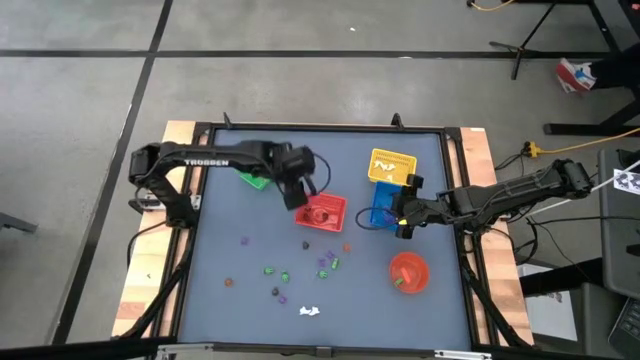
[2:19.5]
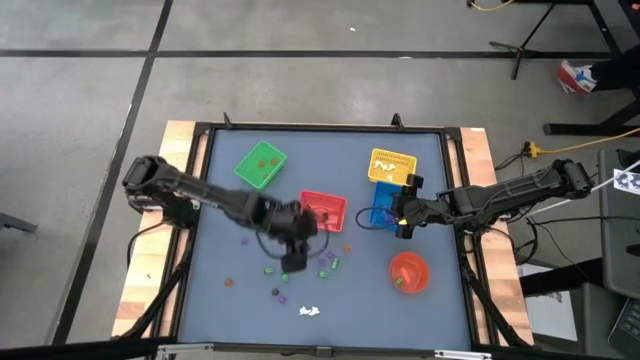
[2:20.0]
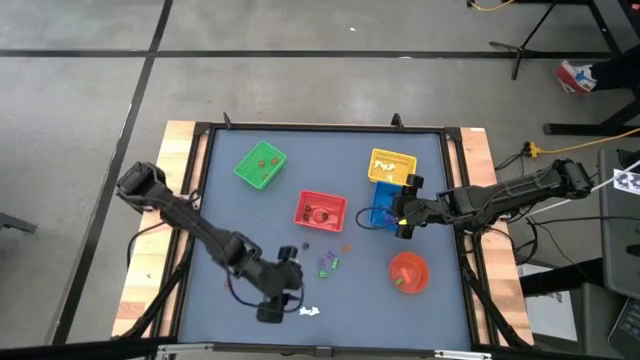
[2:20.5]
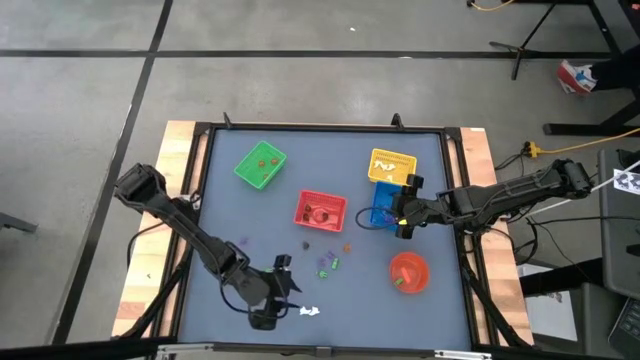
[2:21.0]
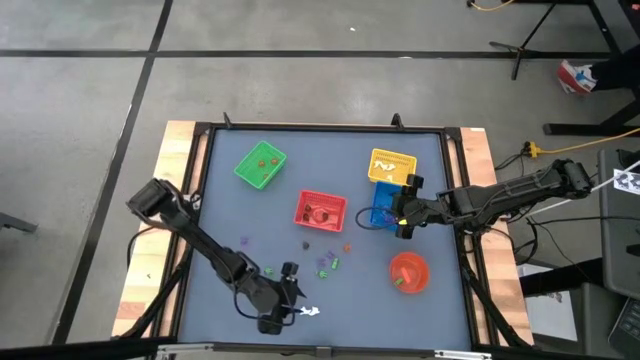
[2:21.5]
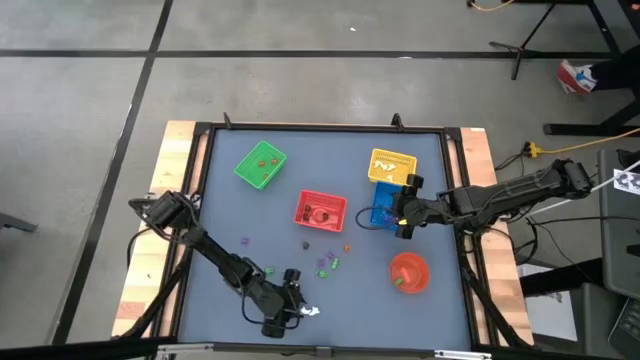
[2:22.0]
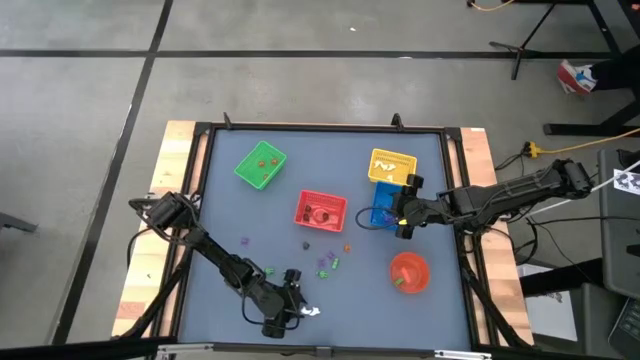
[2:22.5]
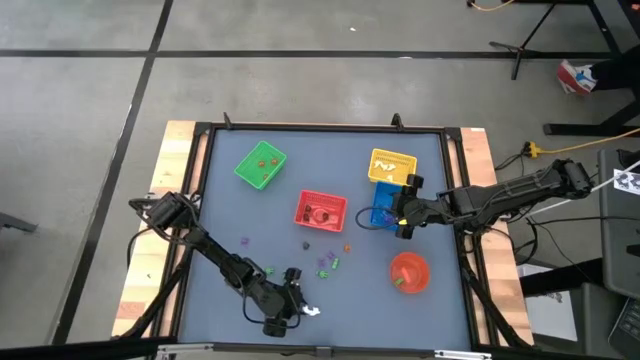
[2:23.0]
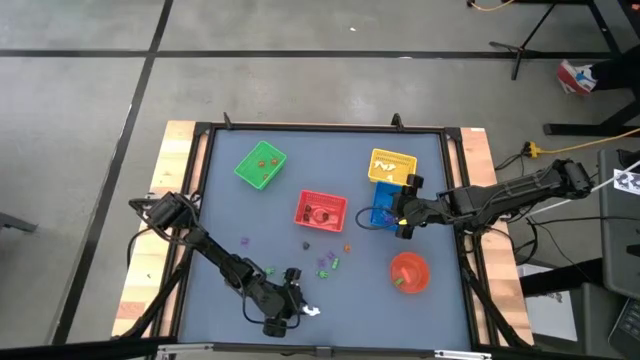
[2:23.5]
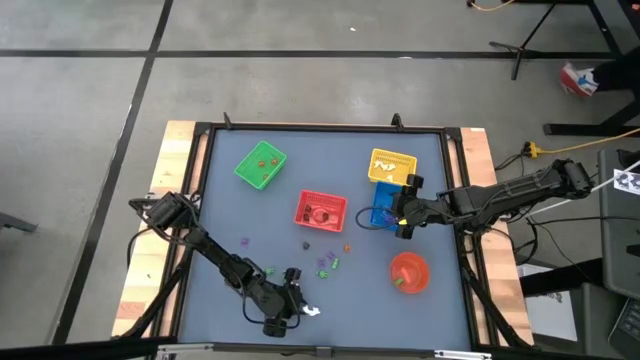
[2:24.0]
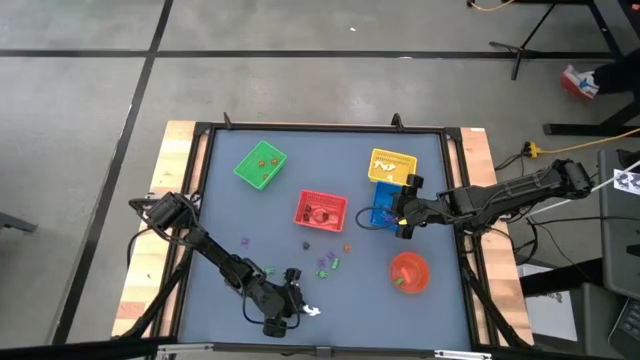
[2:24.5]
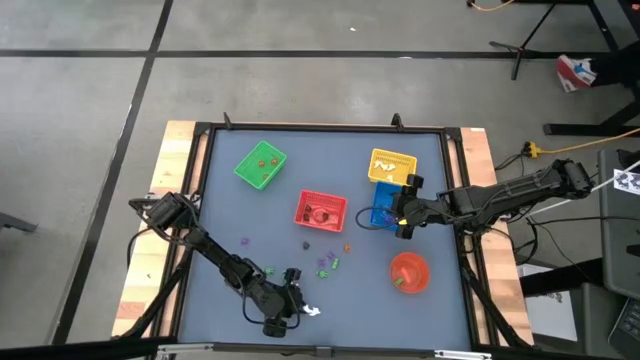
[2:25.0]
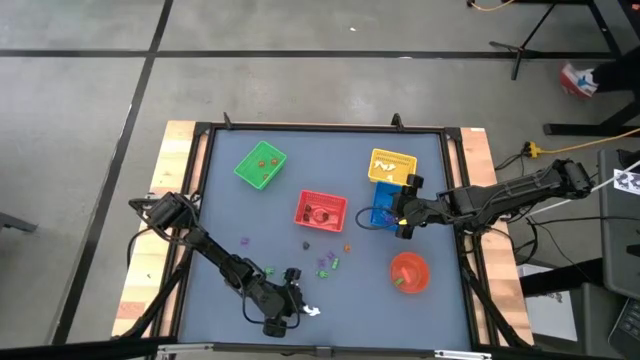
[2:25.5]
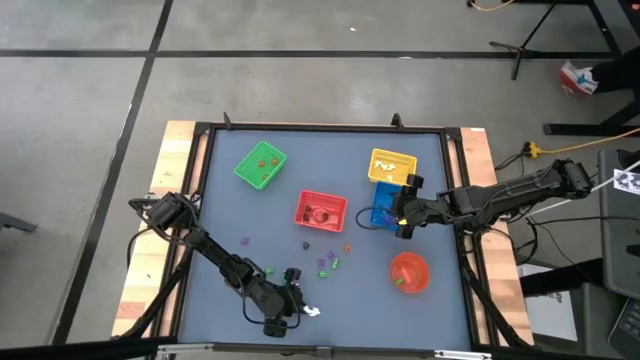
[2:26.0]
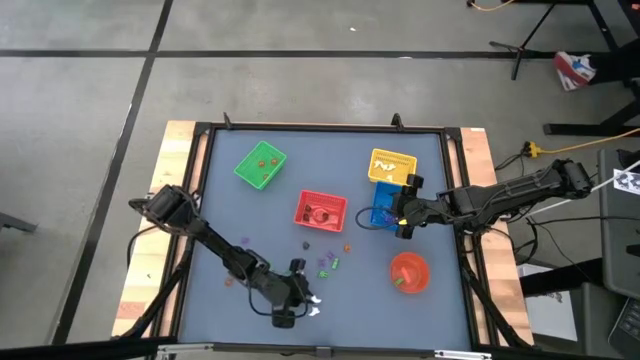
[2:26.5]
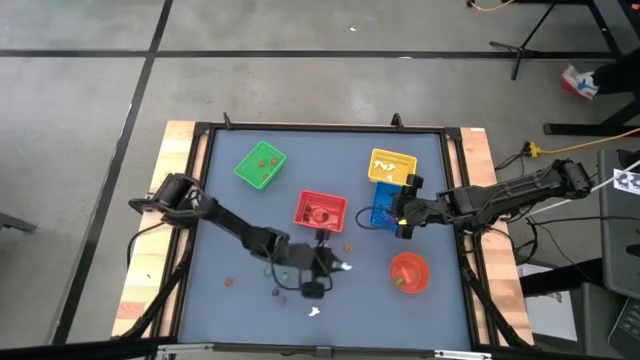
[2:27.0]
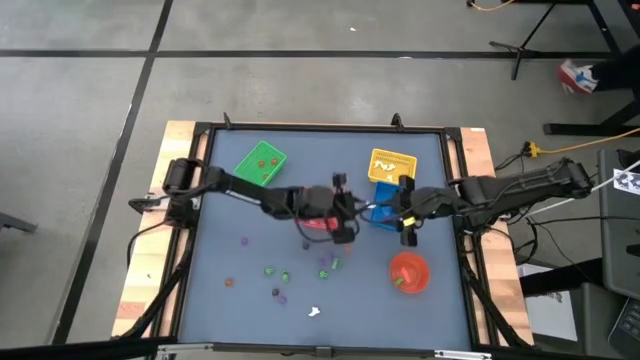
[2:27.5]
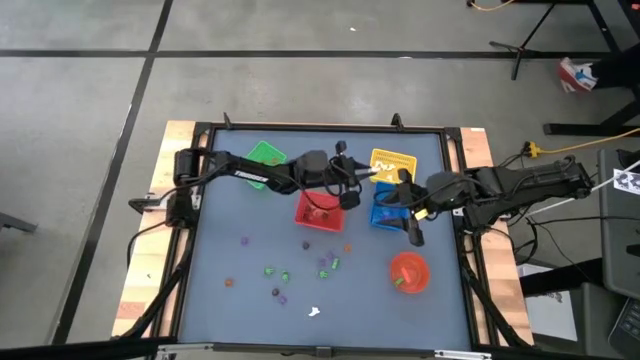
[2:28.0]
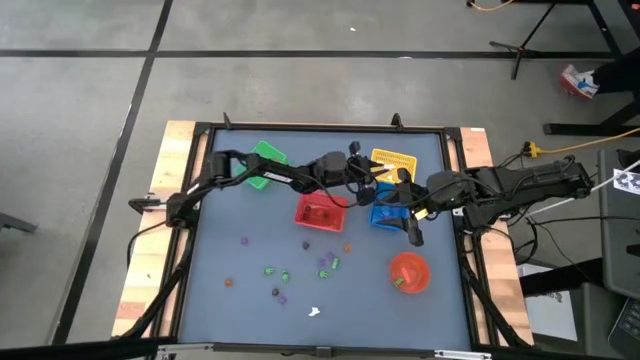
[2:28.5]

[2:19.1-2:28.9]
Task: Sort Halloween decoration
Put the white ghost toy into the yellow bin

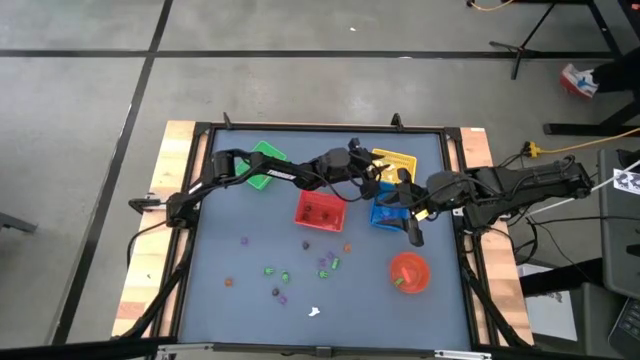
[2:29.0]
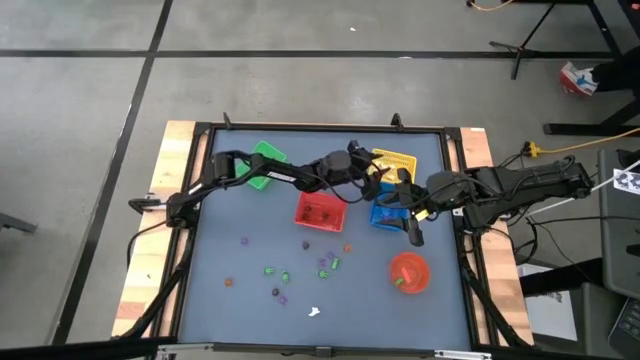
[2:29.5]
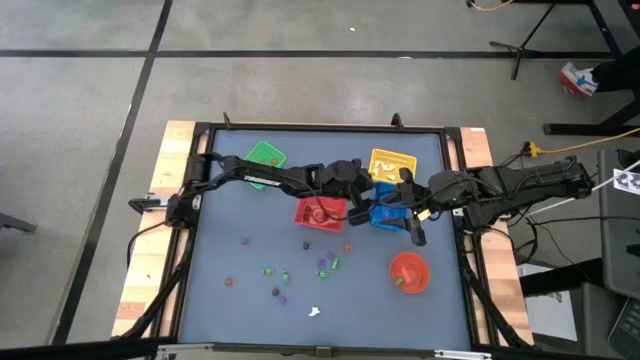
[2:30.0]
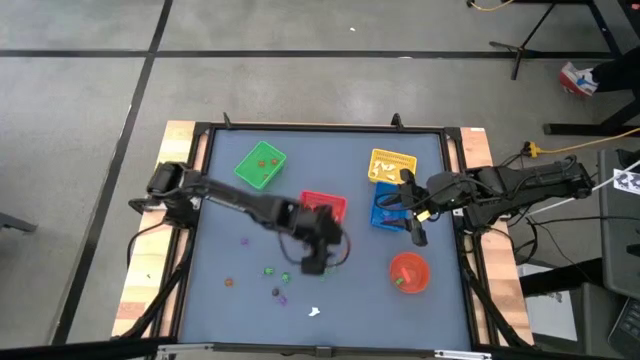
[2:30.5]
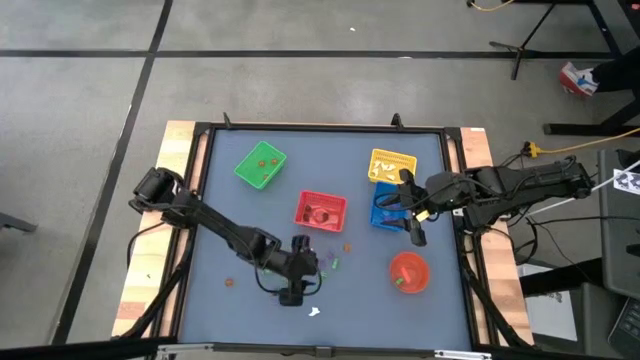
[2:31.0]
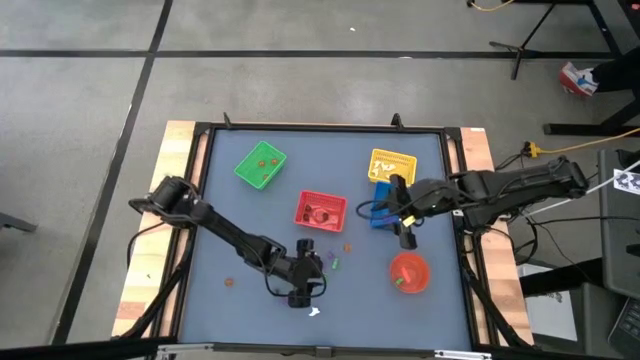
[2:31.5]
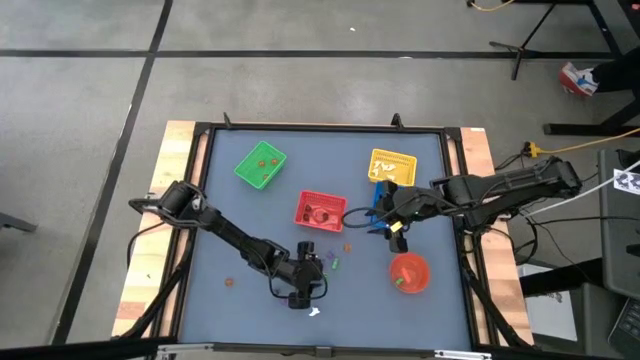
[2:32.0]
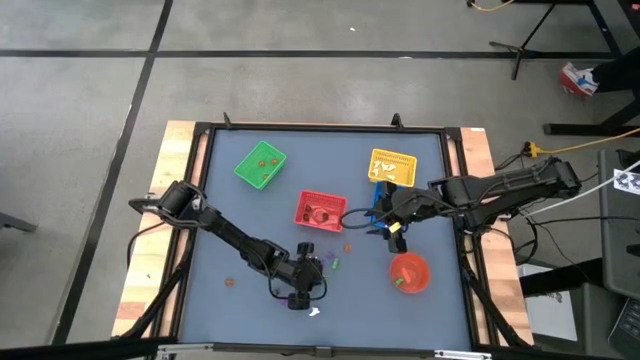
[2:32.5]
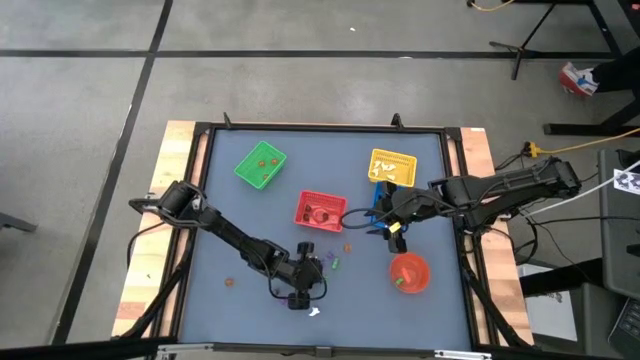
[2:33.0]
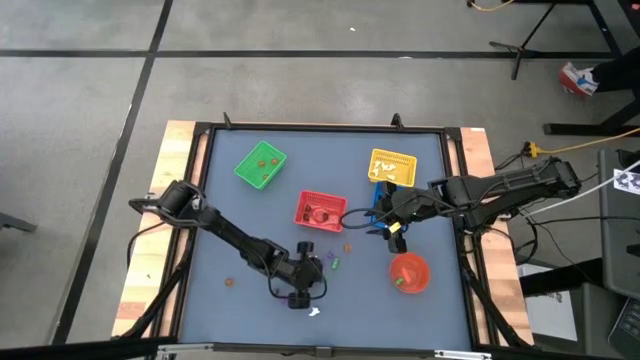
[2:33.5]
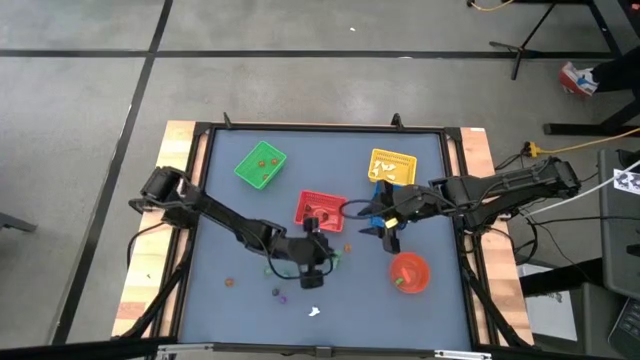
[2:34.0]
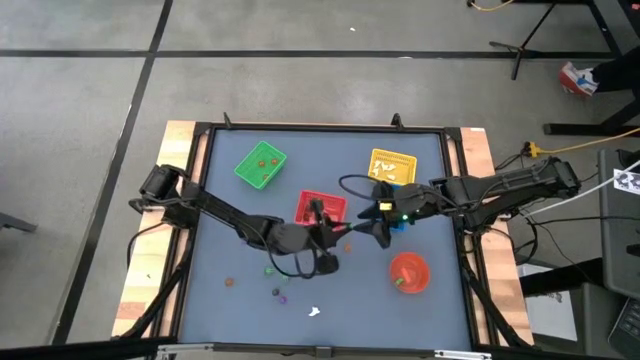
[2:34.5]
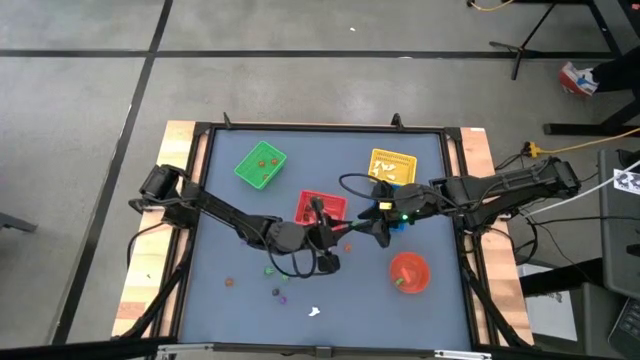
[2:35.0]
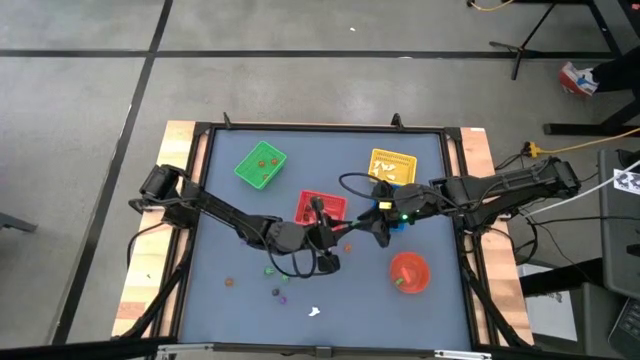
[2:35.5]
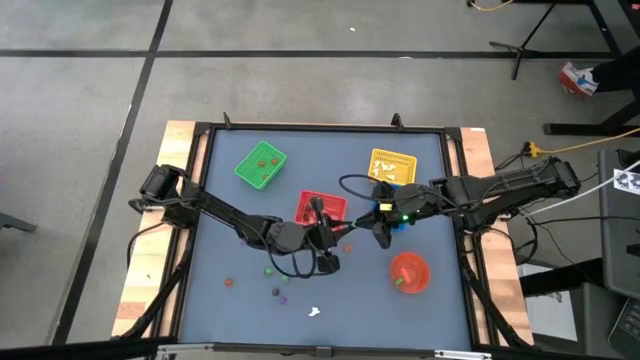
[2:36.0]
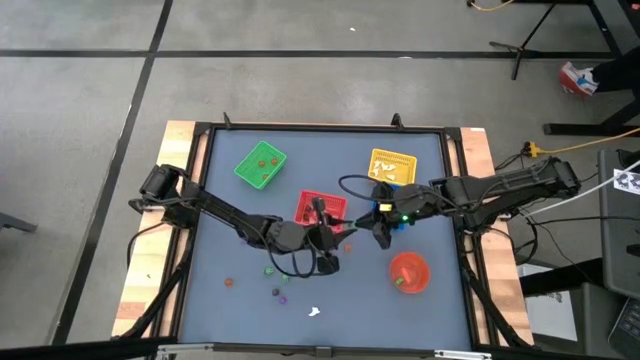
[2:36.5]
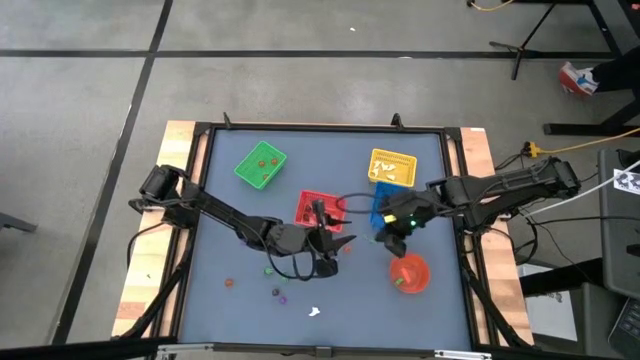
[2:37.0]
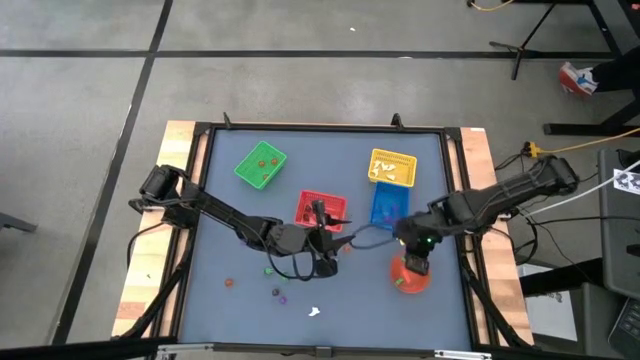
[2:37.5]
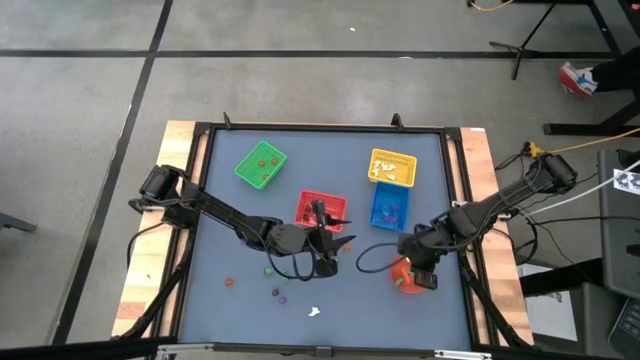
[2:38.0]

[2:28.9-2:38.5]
Put the green skeleton toy into the orange bin

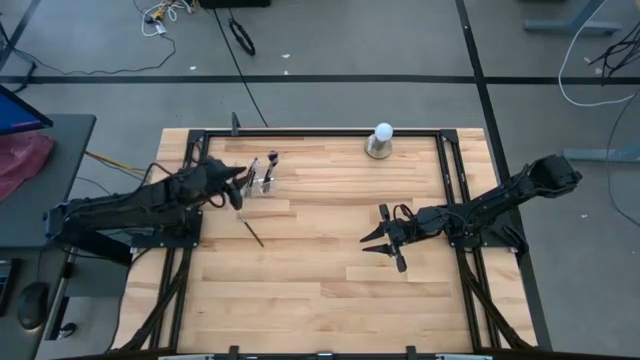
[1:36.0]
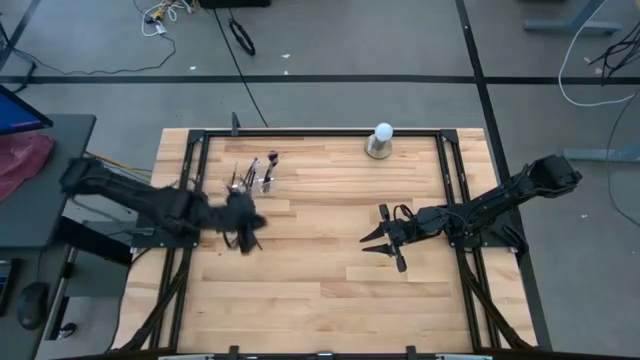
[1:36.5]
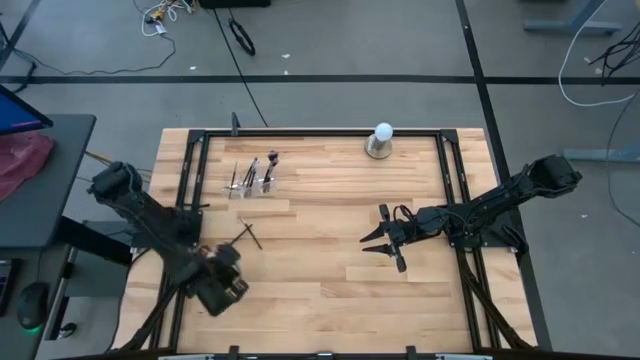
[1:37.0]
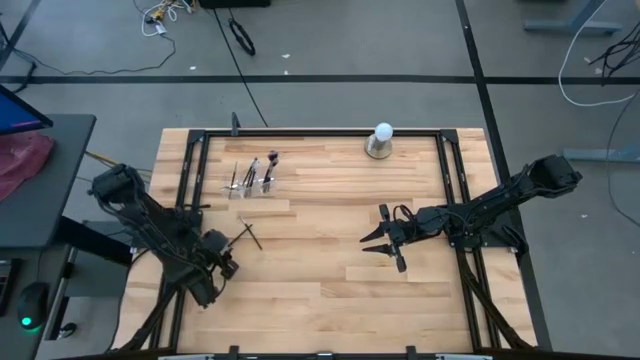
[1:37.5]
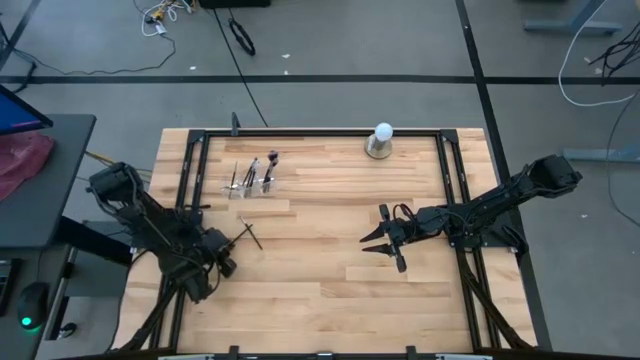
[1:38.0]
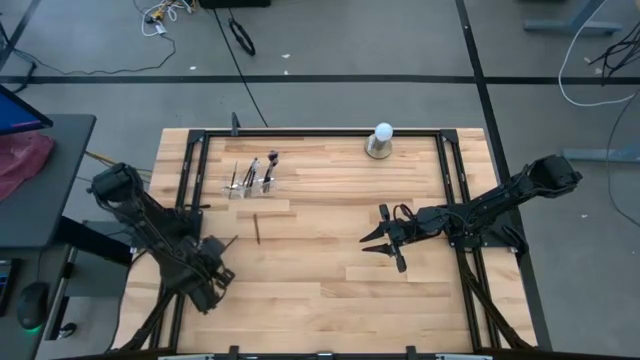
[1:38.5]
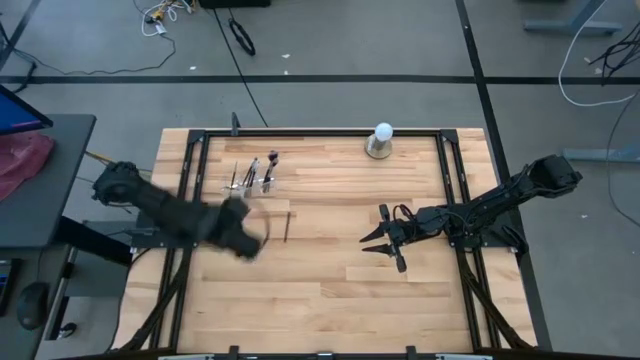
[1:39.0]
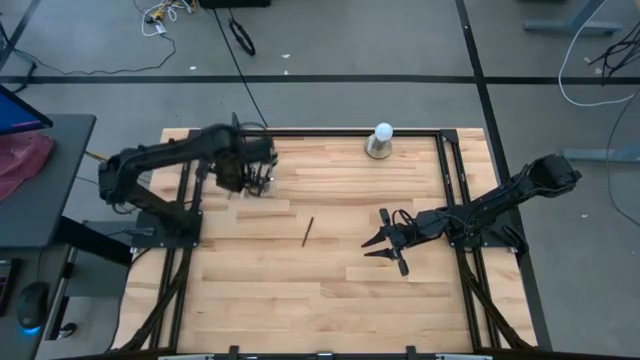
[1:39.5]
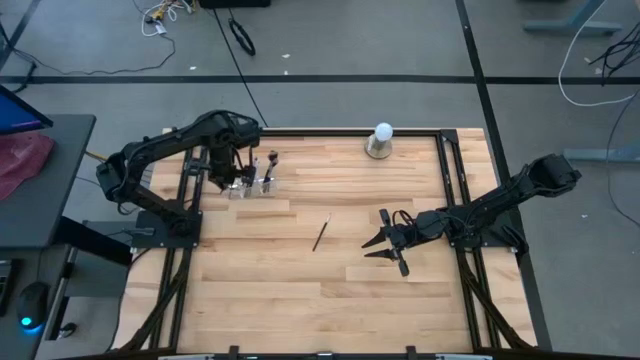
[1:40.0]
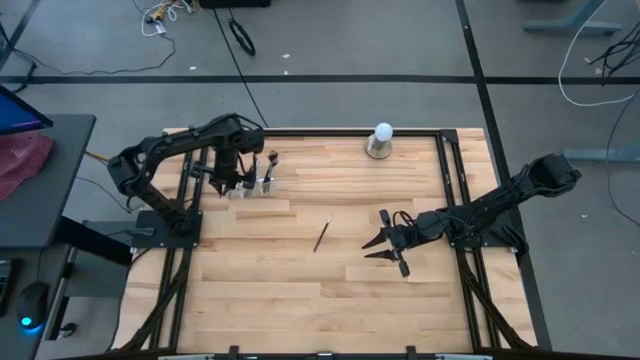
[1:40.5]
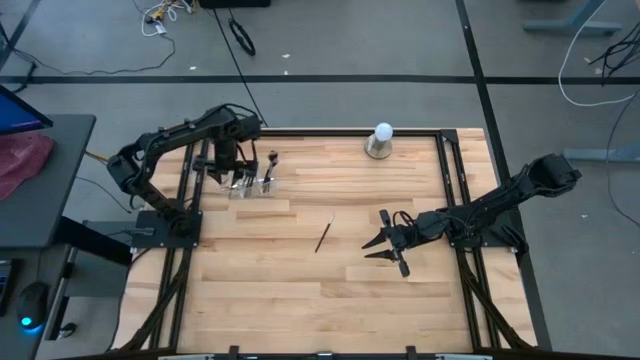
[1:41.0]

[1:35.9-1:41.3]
Task: Put items in baskets/containers
Put the black eyeshadow brush into the left section of the transparent organizer
